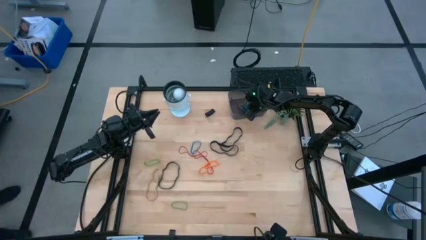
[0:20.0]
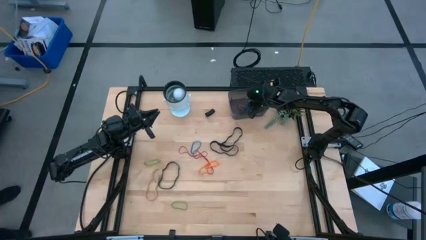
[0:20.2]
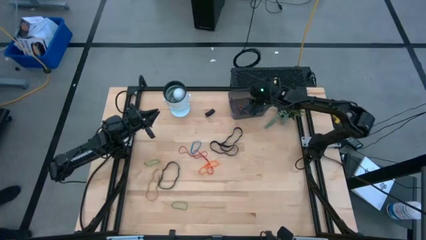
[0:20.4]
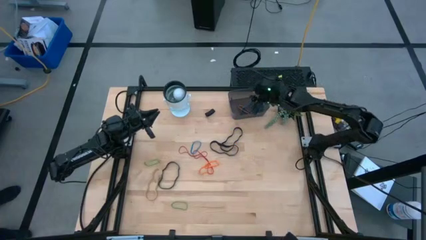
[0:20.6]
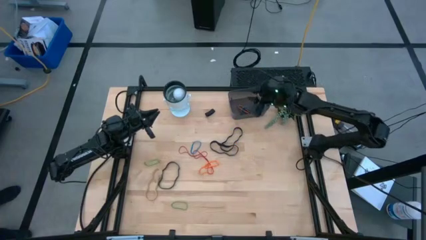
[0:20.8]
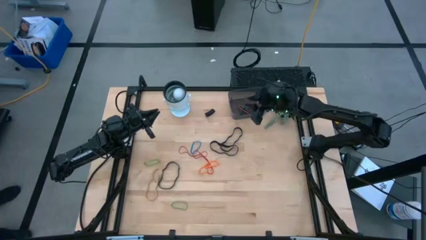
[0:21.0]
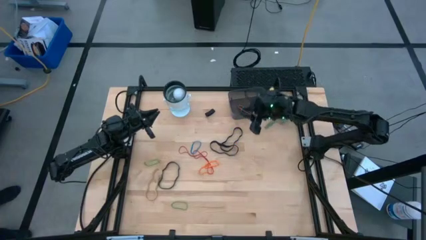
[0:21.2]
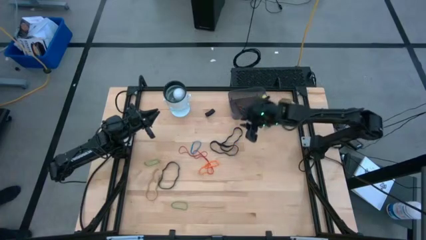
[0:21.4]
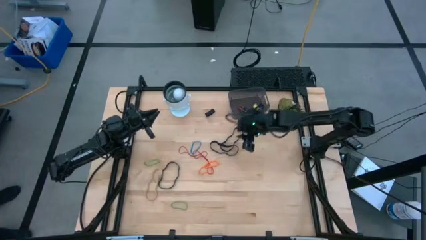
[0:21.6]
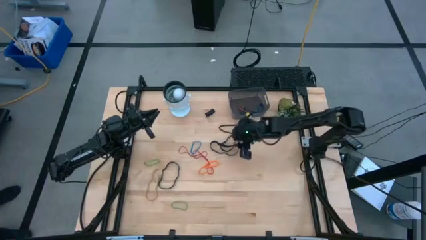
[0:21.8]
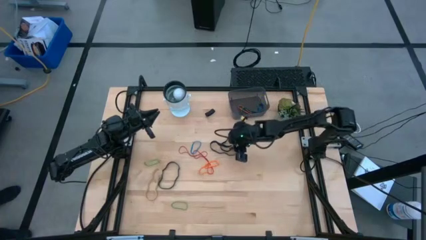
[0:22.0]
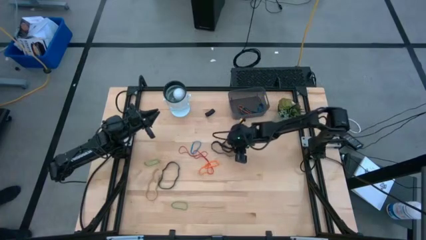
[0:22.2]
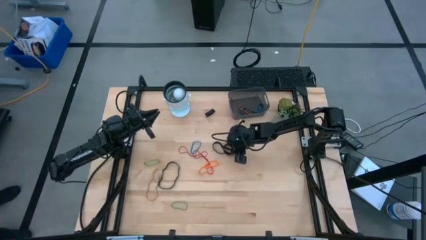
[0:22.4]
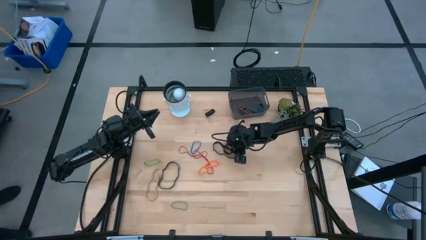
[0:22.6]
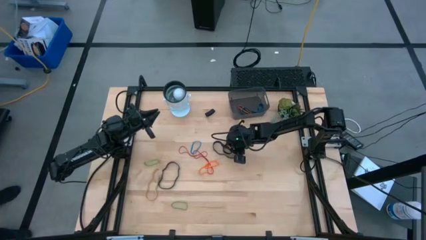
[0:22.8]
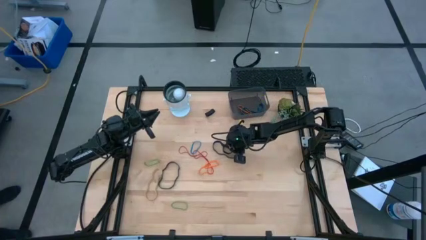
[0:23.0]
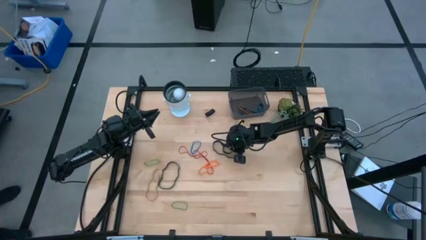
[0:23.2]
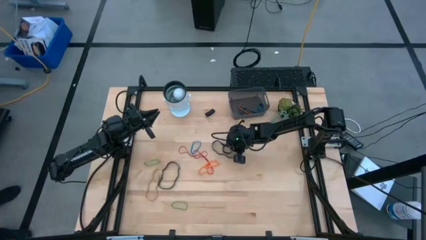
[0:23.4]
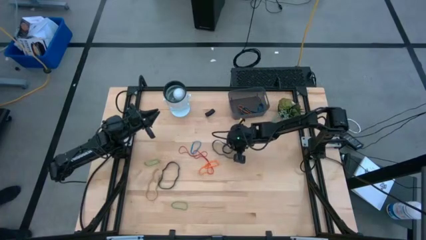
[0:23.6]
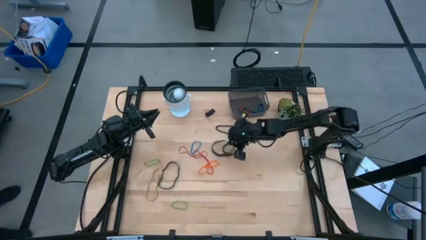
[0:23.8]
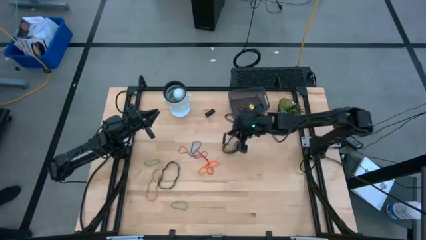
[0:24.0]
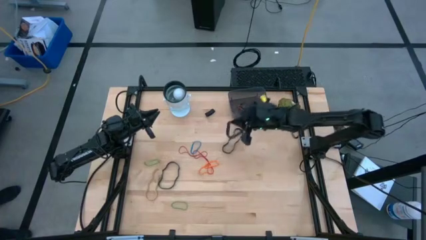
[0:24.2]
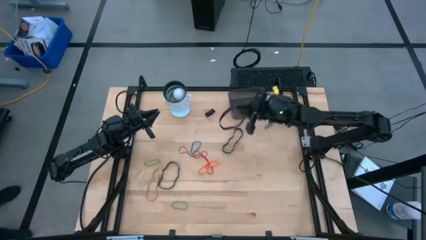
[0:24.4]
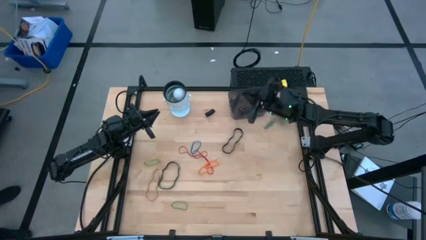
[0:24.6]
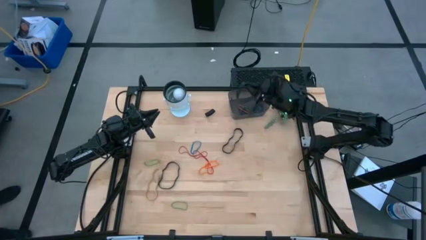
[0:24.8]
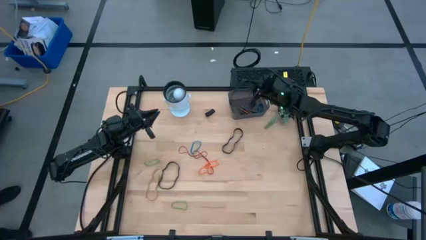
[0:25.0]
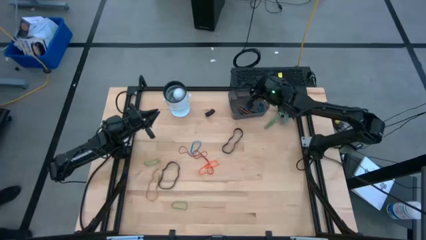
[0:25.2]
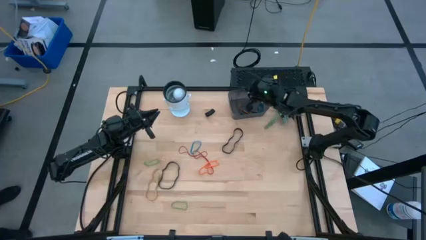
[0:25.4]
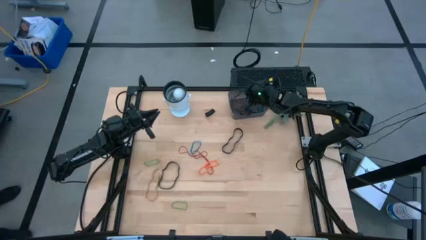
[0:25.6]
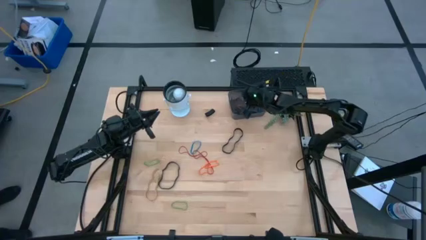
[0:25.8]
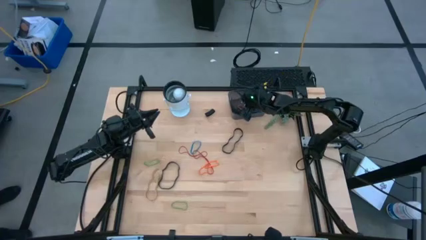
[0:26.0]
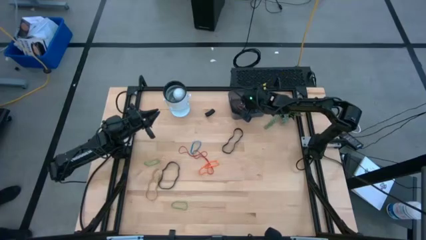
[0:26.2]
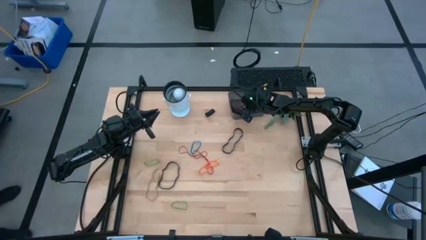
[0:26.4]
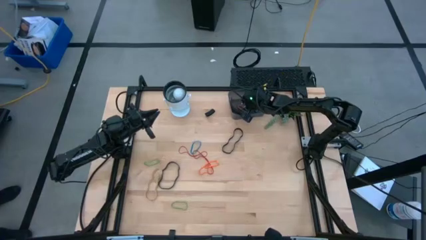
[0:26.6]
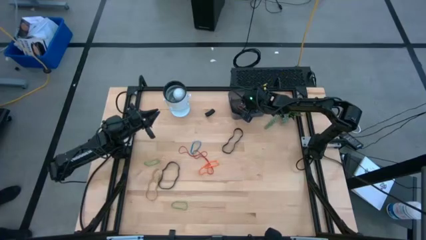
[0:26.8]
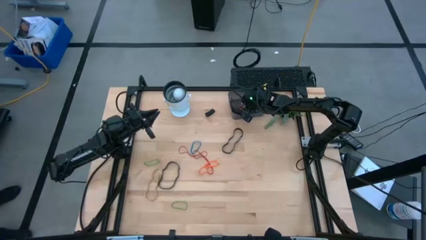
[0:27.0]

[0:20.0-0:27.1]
Task: Pick and place rubber bands into bin
Put the black rubber band into the black bin

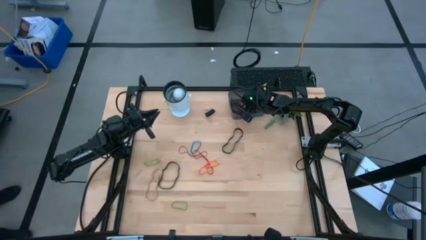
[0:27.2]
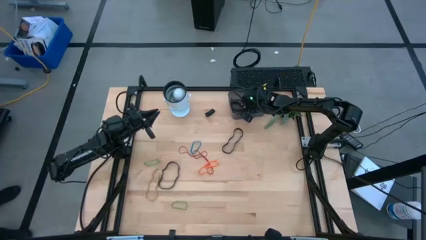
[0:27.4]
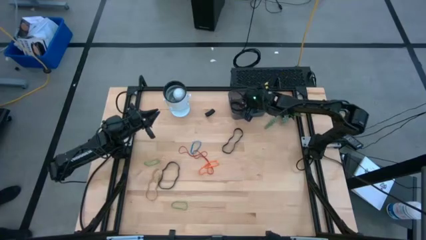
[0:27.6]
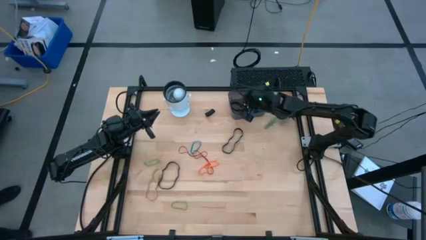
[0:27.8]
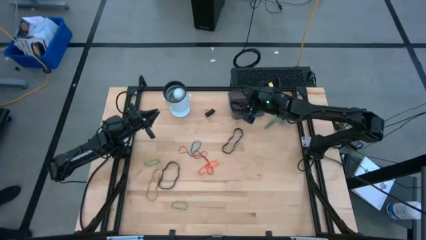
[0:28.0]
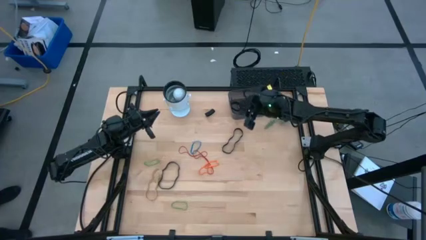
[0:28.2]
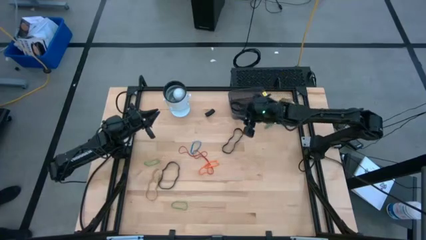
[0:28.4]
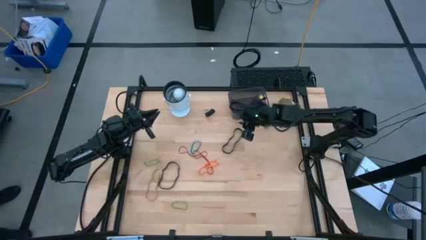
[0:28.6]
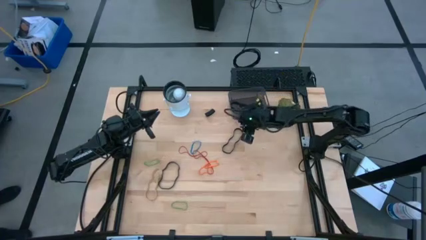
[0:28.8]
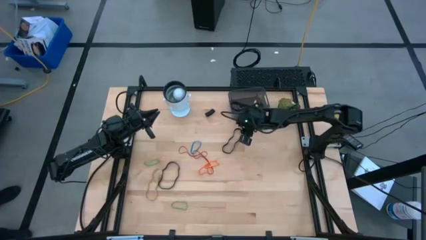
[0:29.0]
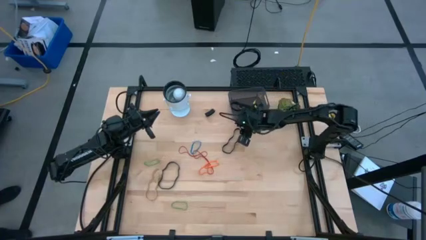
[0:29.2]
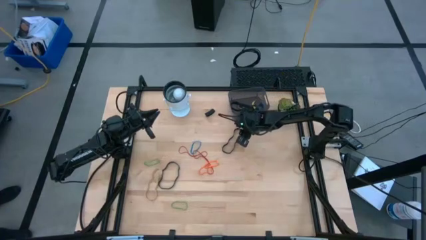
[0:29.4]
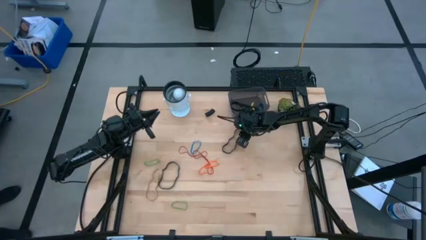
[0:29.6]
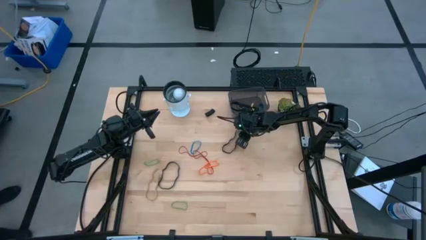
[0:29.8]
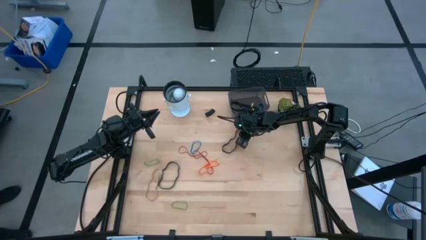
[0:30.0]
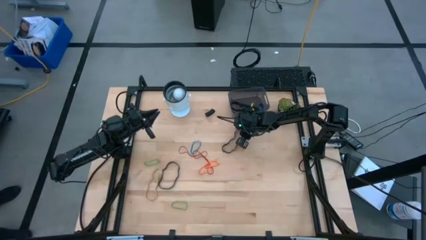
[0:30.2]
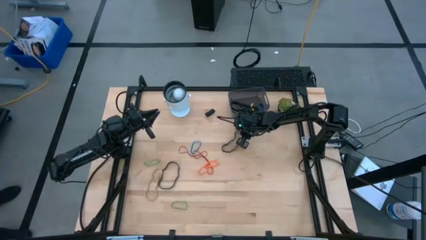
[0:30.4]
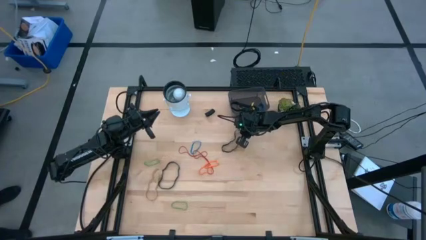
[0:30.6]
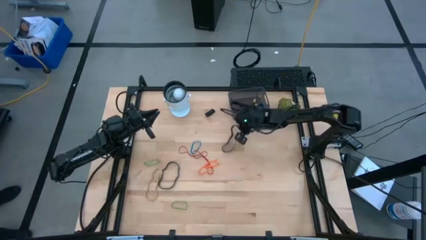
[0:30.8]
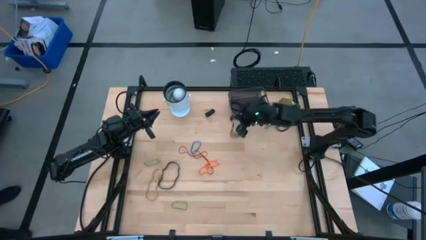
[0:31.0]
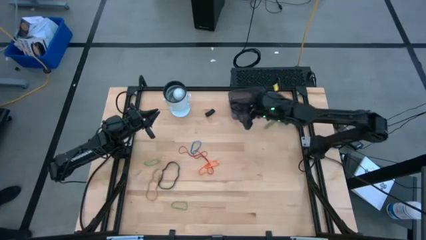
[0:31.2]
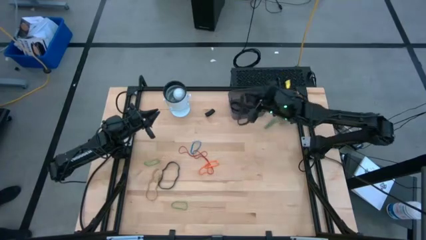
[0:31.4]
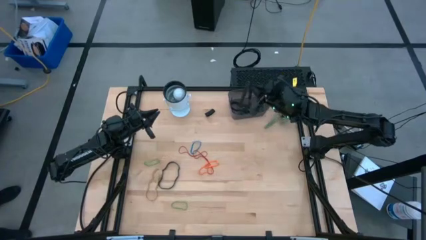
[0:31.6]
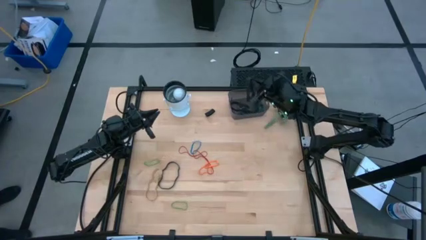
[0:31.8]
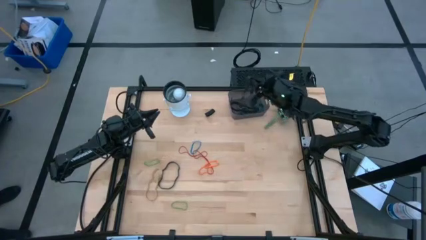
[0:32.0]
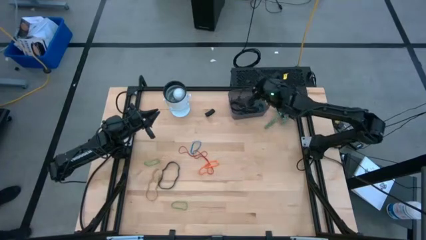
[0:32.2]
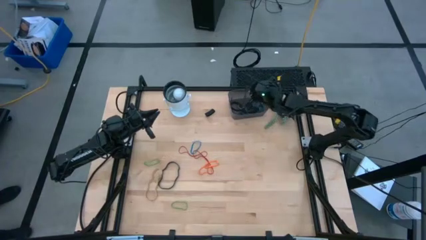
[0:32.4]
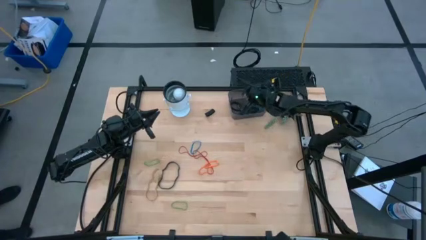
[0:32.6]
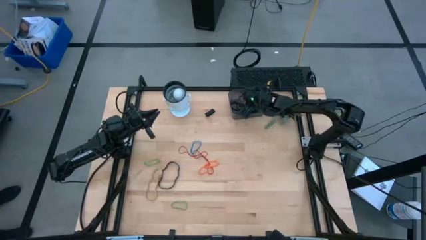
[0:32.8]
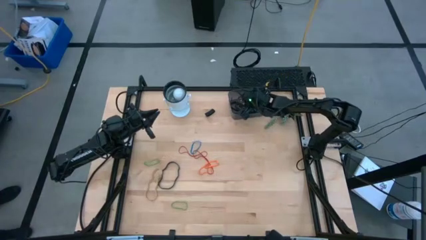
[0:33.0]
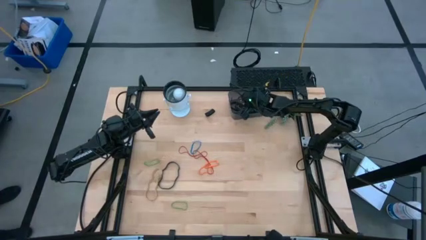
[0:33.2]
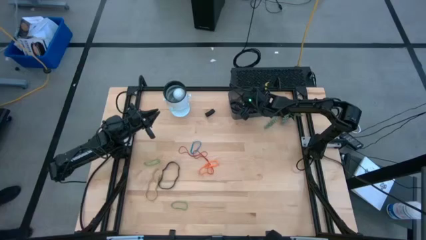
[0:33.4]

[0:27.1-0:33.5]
Put the black rubber band into the black bin

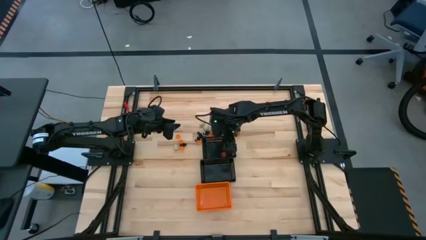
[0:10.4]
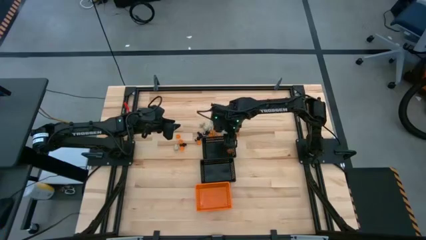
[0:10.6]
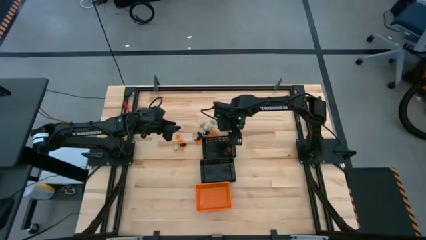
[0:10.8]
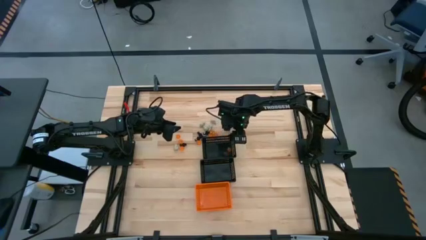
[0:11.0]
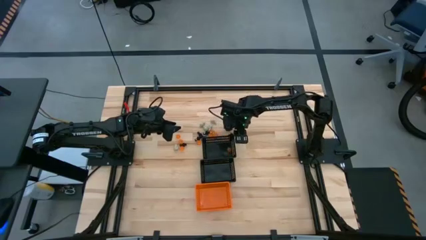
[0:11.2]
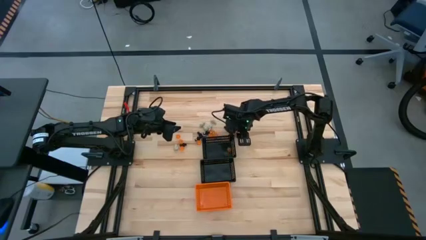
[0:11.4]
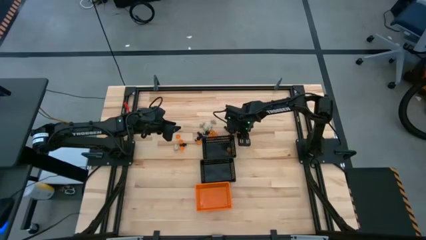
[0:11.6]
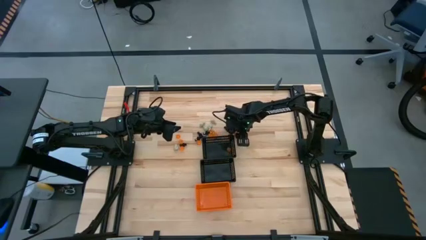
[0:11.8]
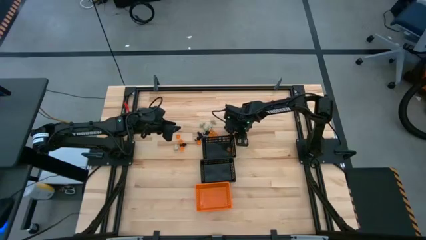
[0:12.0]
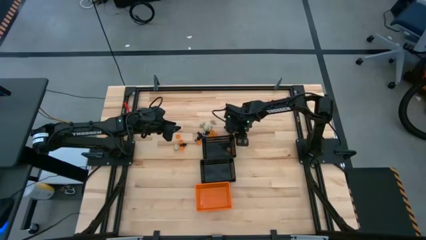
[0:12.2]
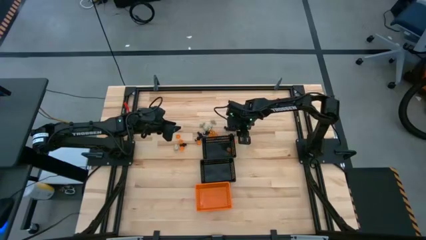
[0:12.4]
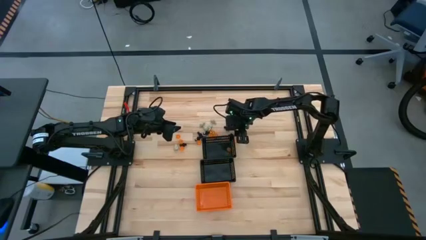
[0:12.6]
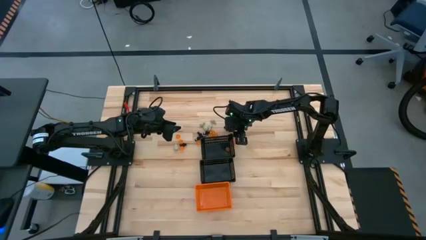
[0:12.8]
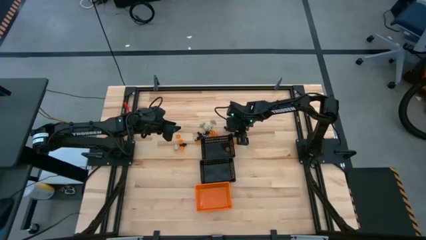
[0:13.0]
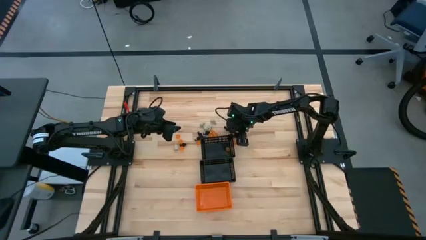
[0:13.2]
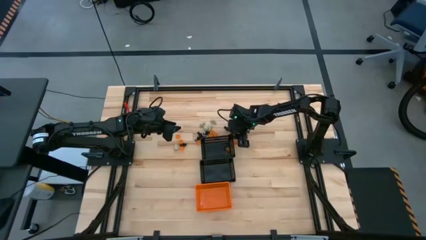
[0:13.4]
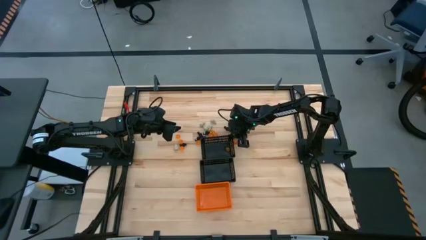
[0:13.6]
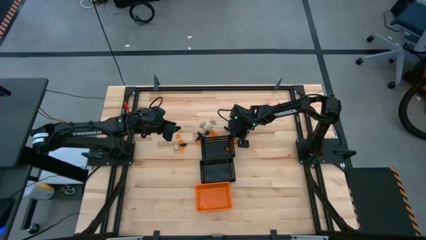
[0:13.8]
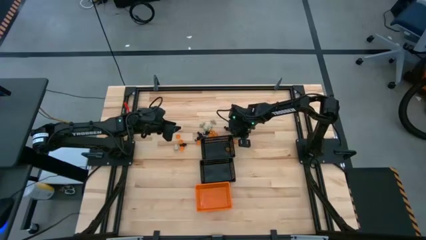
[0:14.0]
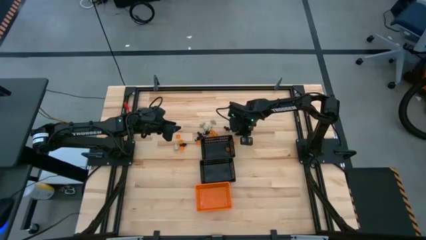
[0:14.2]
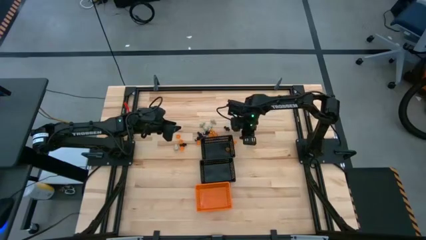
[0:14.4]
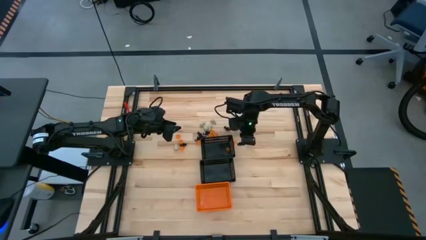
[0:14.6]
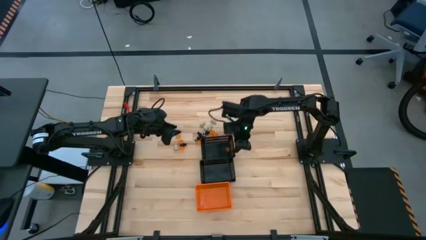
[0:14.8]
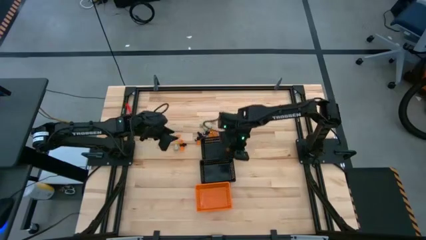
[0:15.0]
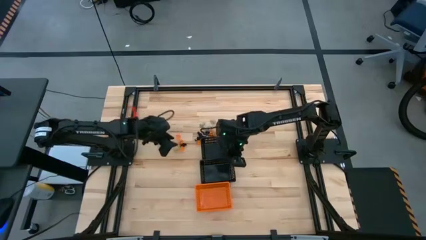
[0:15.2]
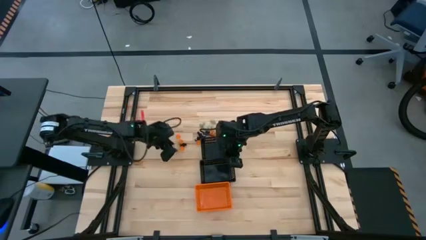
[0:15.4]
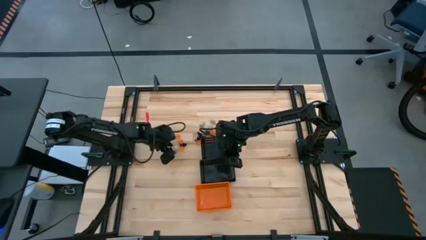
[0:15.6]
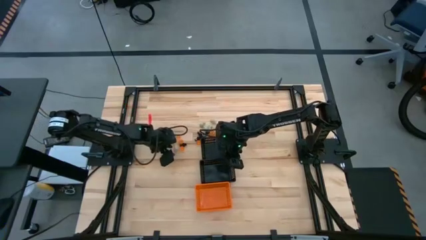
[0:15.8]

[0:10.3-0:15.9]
Task: Sort Halloween decoration
Put the black skeleton toy into the bottom black bin
